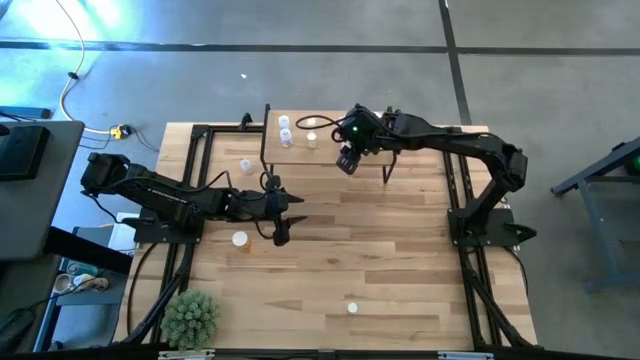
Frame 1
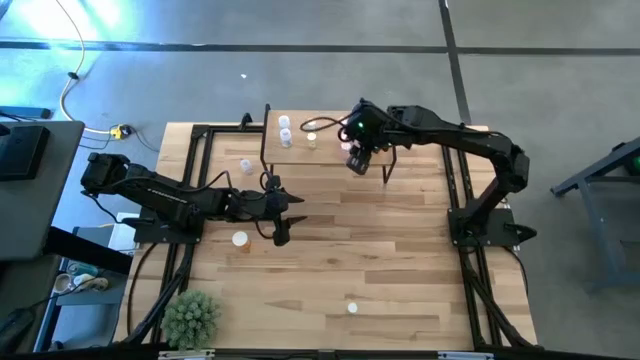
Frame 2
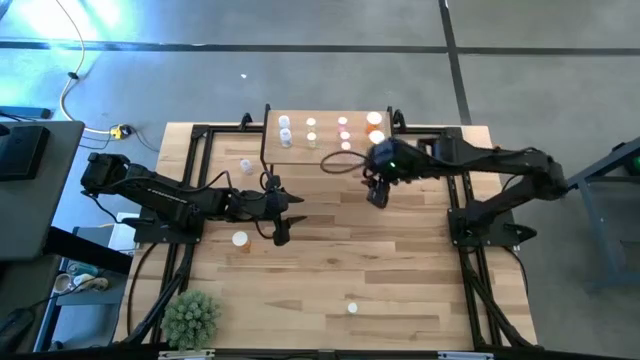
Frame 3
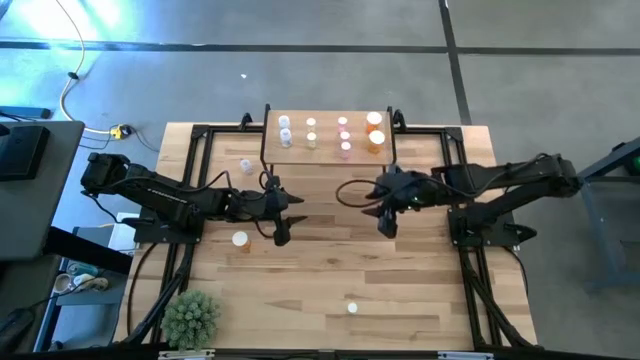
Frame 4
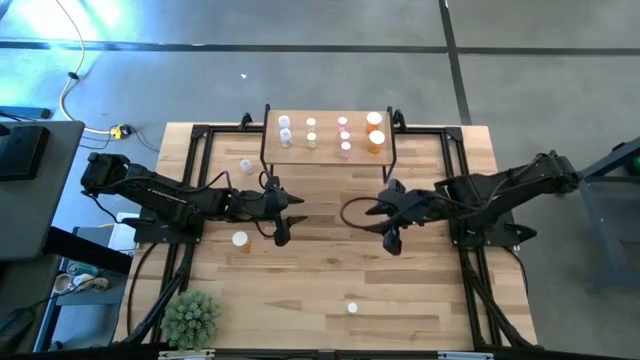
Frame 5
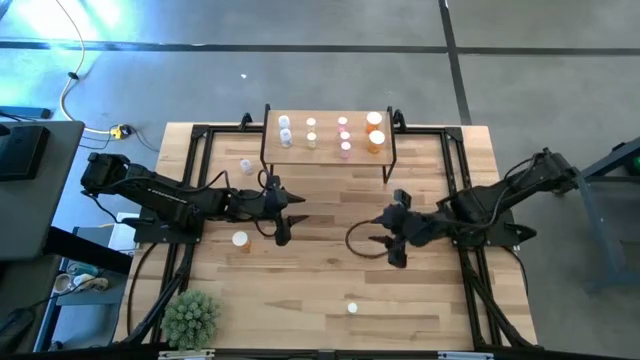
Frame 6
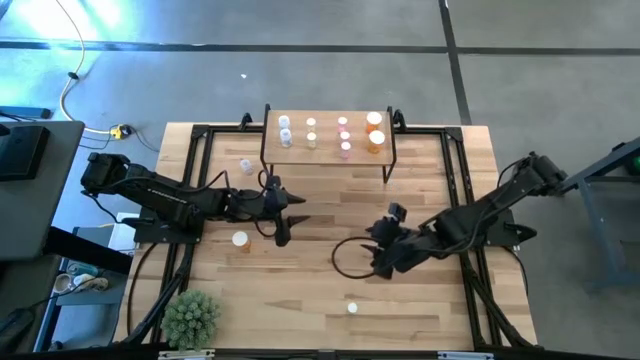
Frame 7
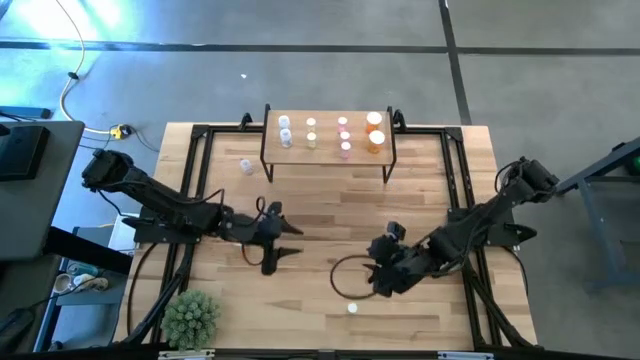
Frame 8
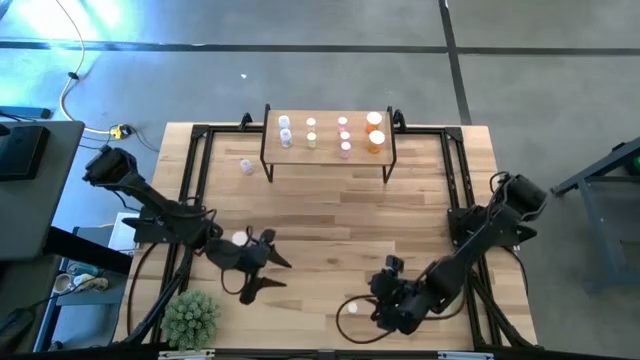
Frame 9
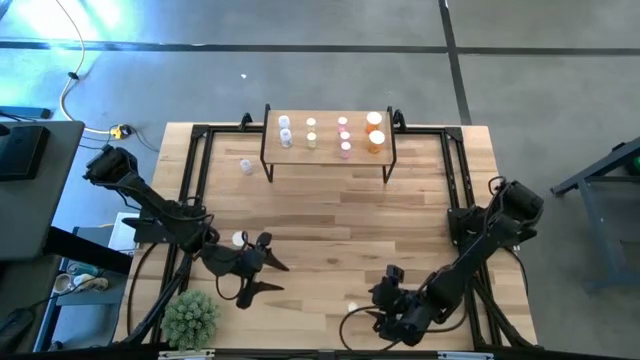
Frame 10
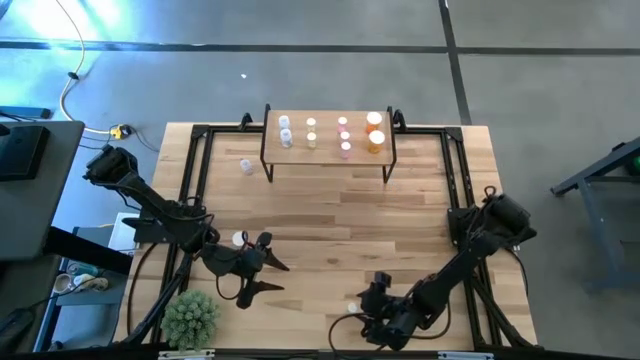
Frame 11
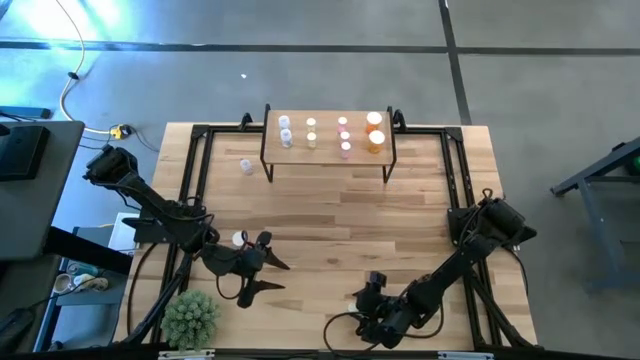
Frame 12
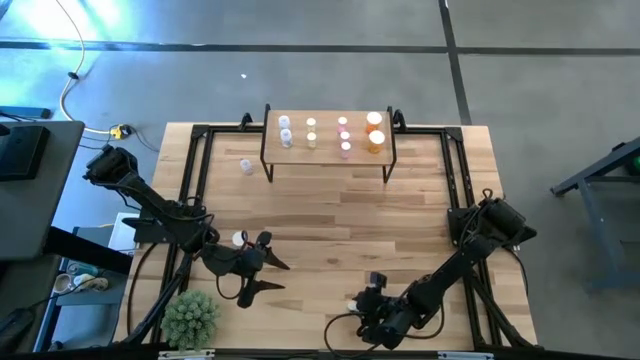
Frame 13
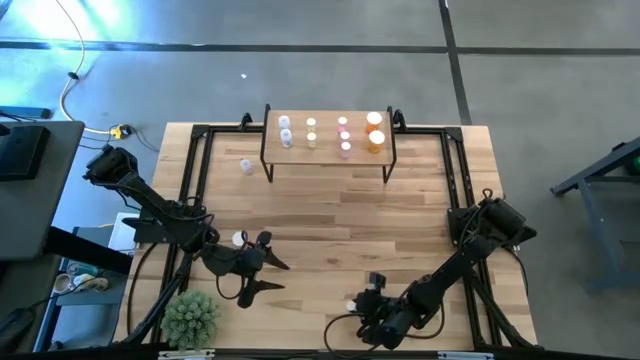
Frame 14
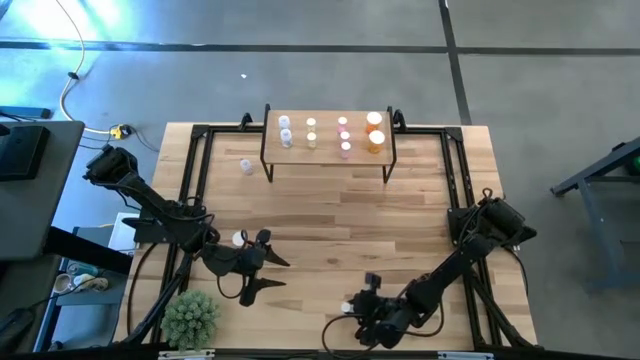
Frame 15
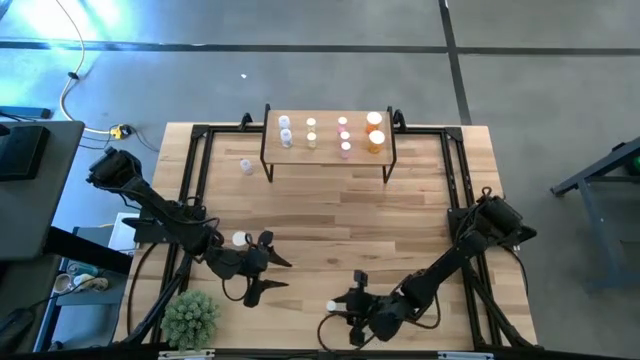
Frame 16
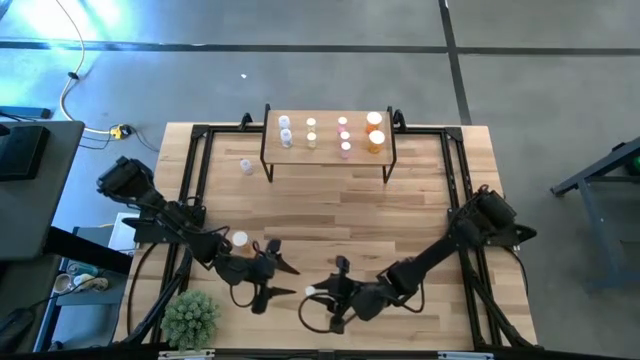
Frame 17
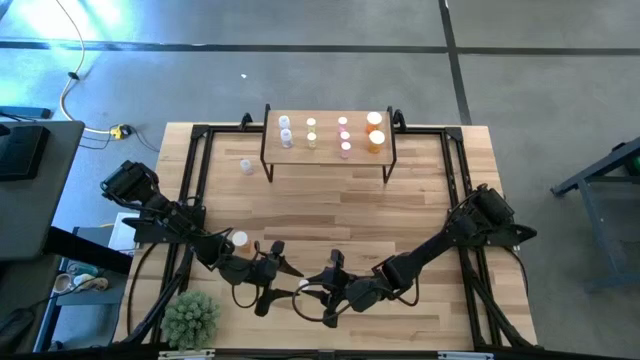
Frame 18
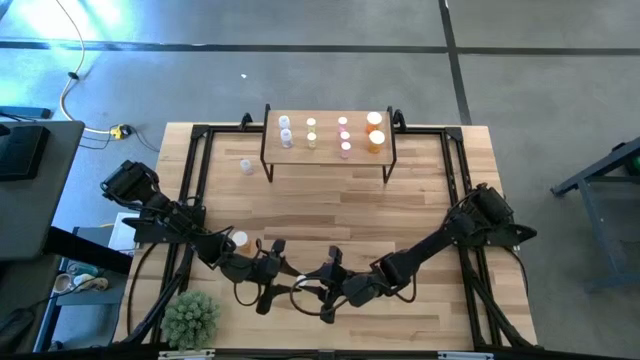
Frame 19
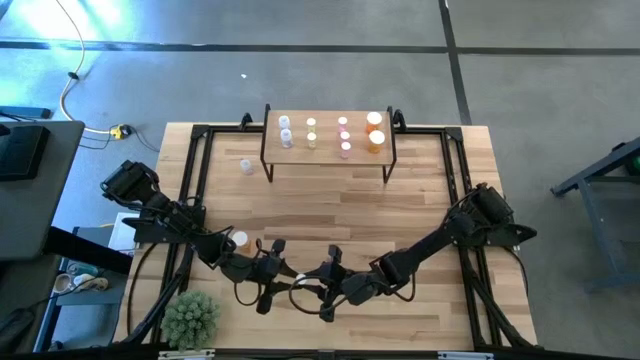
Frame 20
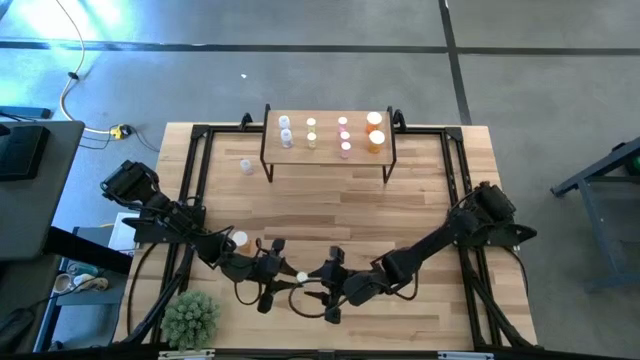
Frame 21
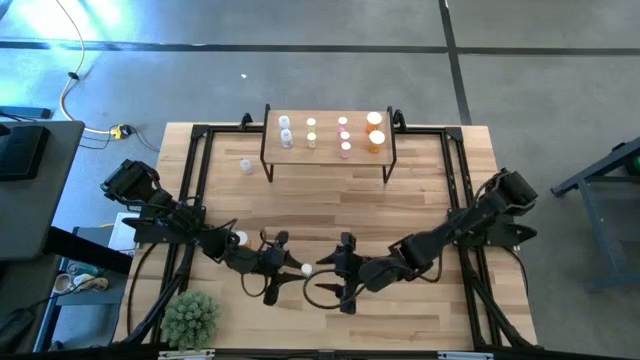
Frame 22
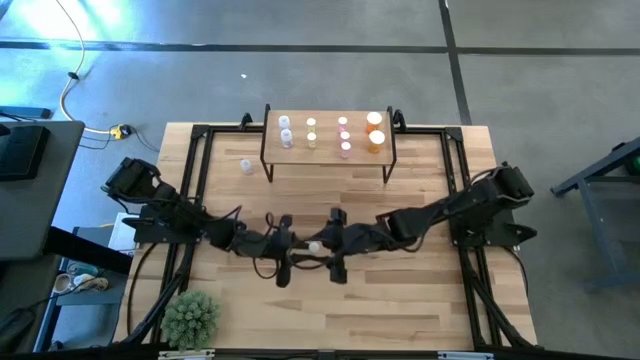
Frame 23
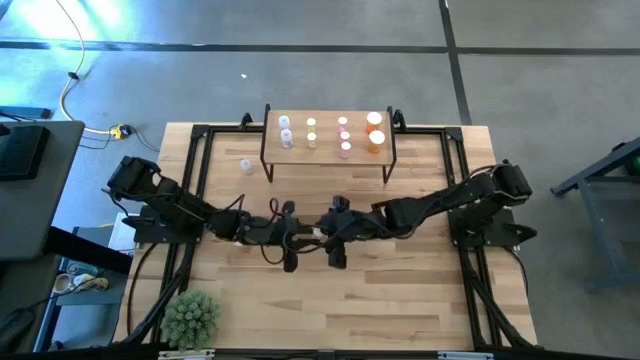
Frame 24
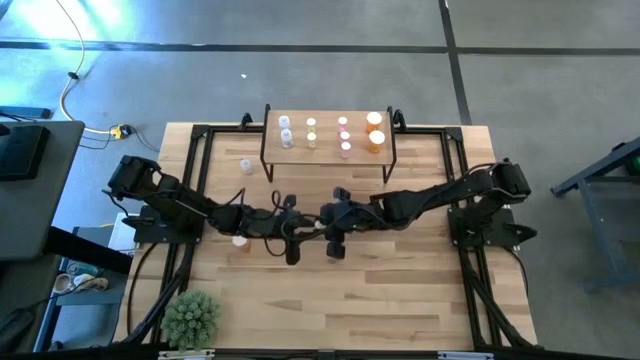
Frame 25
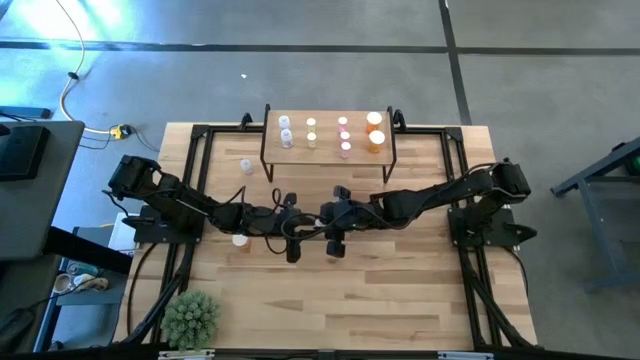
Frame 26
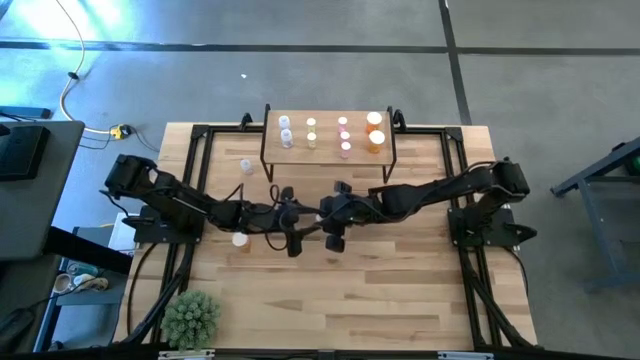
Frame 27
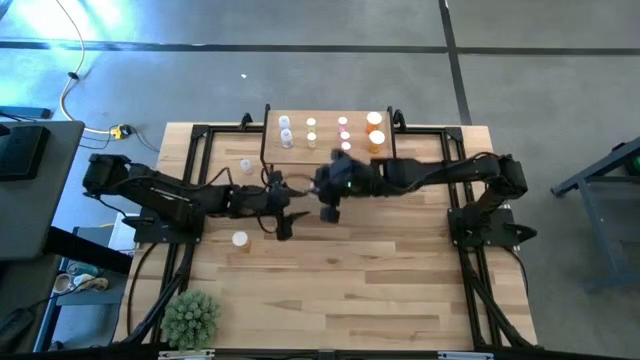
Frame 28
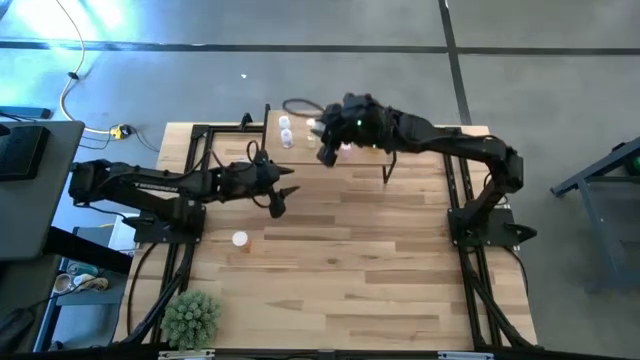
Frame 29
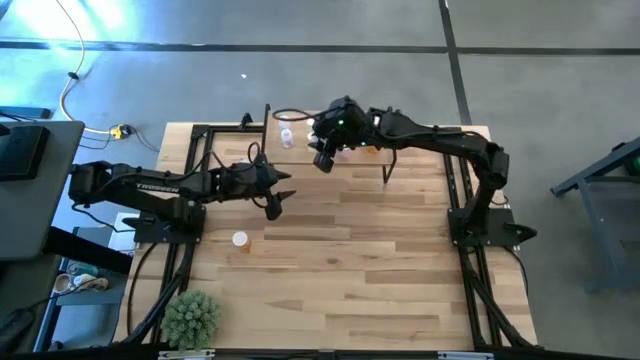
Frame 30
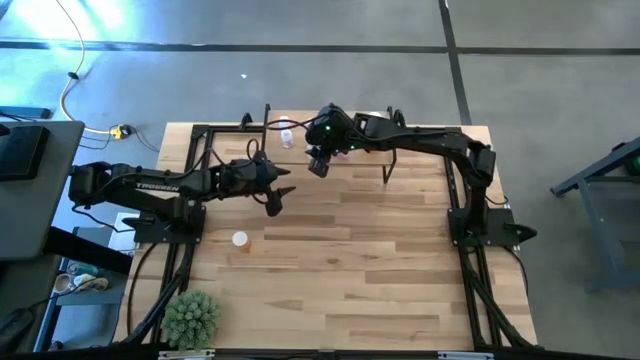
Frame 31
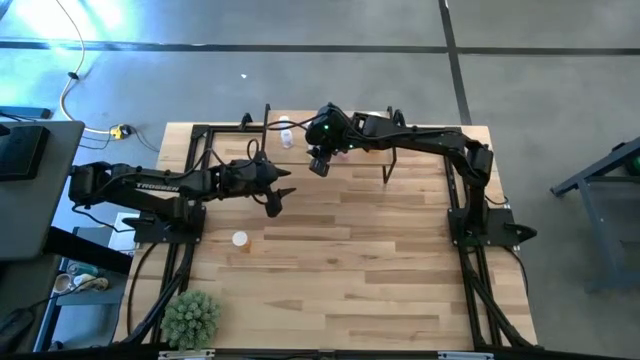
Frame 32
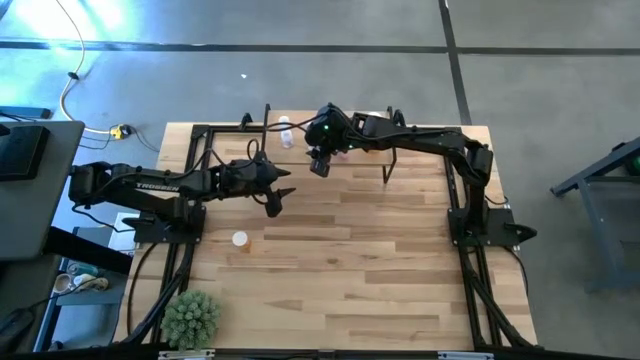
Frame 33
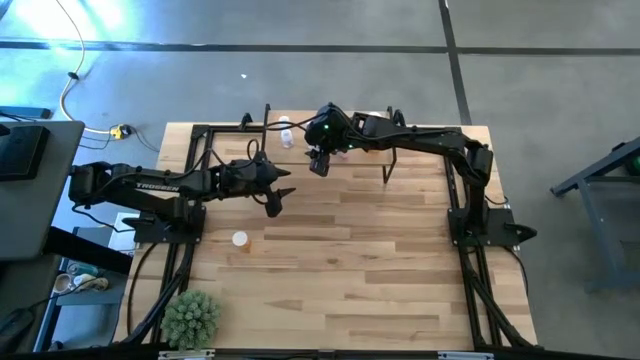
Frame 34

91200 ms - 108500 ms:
Task: Pick and place medicine bottles onto shelf by color
Put the yellow pill bottle on the shelf aligned with the yellow pill bottle

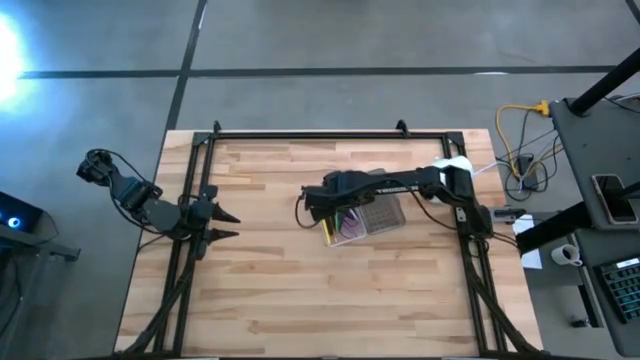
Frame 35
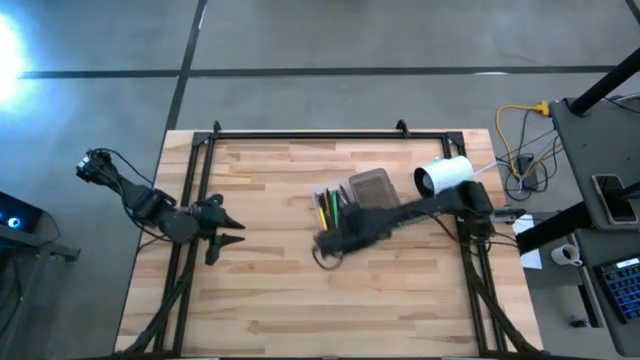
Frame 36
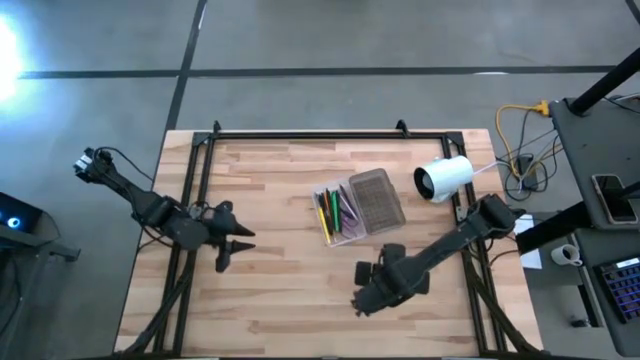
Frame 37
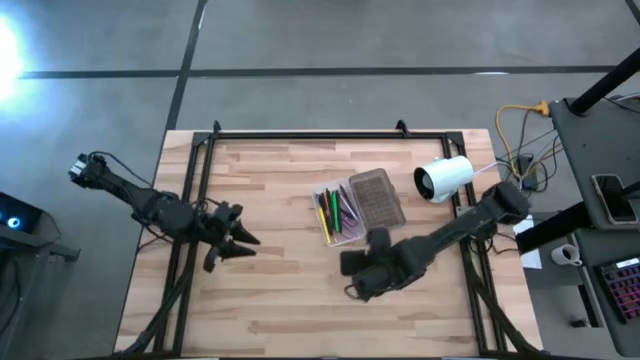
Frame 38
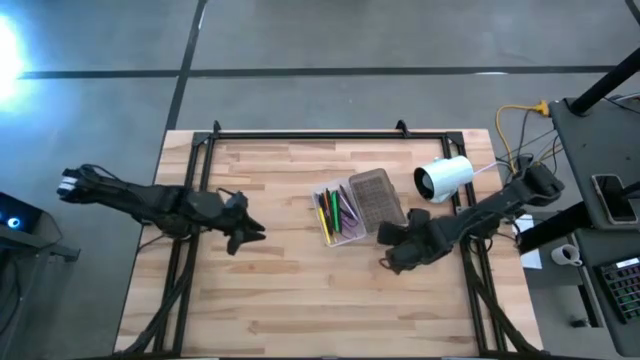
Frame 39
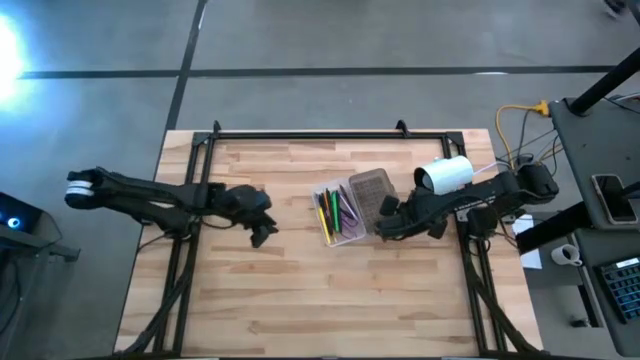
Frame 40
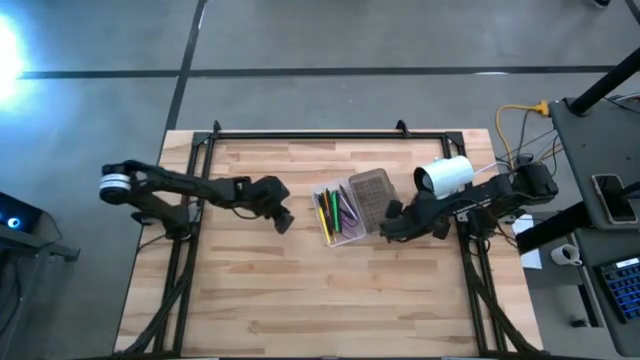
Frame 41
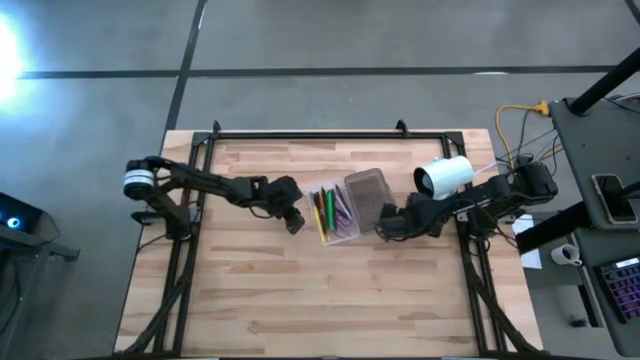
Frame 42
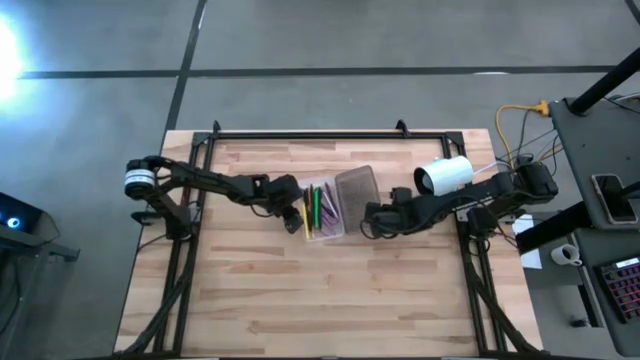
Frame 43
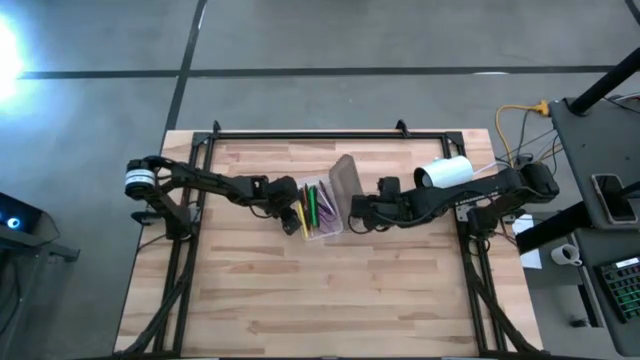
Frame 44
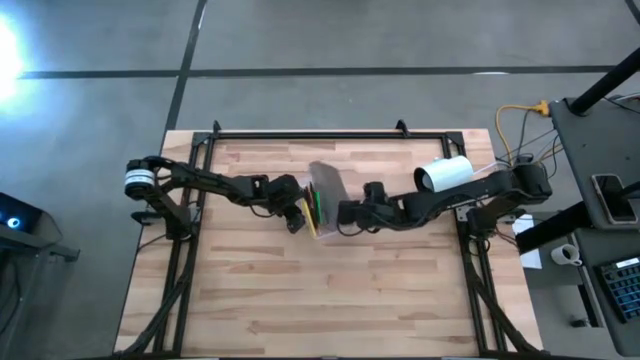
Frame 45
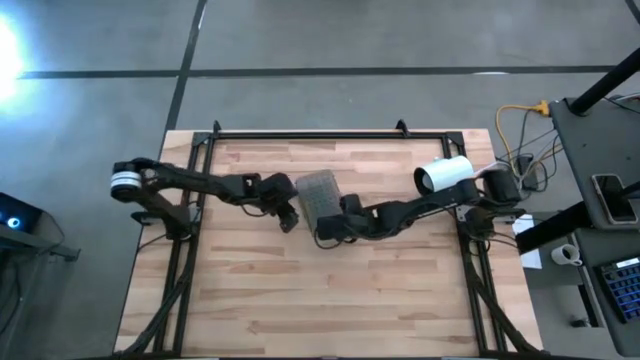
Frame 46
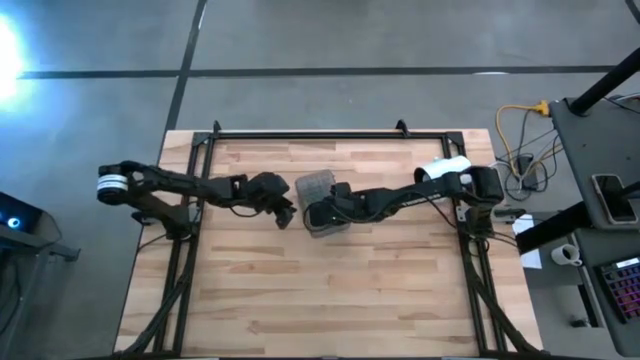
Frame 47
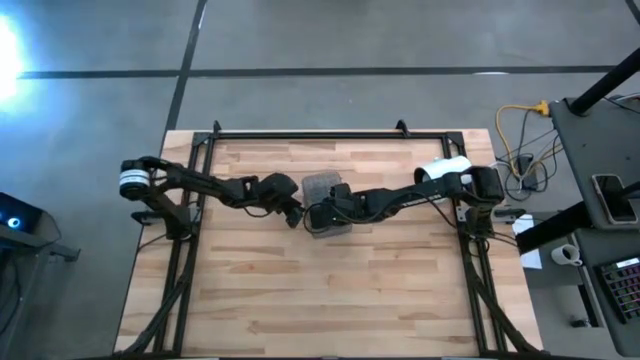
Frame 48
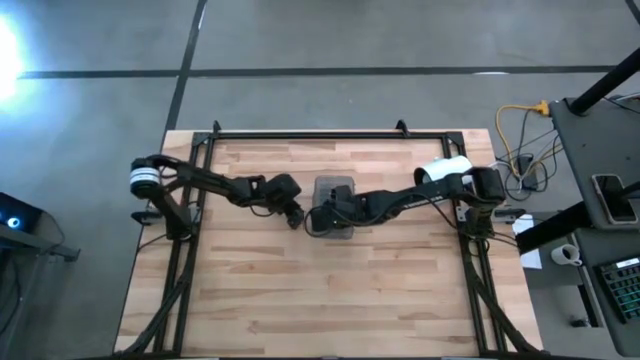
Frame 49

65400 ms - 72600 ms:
Task: Pick & place school supplies into a supply box
Close the supply box
